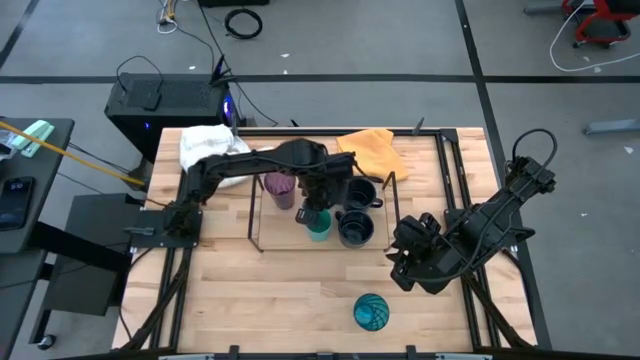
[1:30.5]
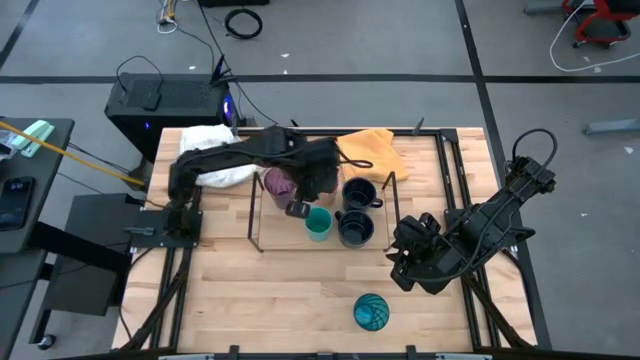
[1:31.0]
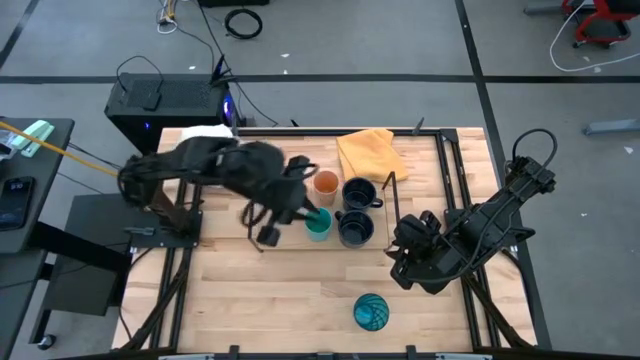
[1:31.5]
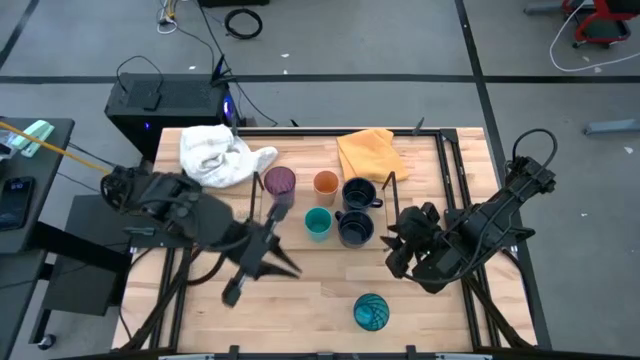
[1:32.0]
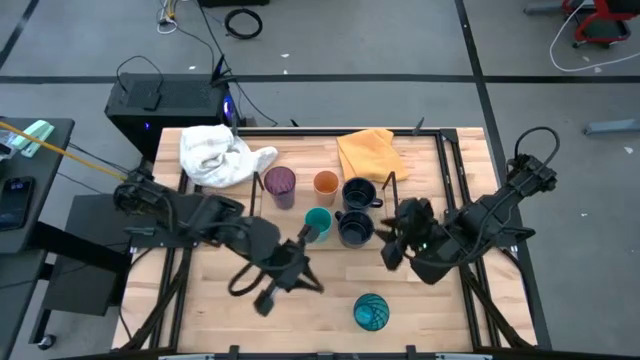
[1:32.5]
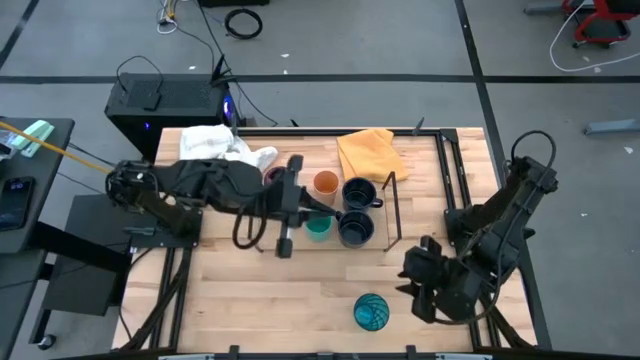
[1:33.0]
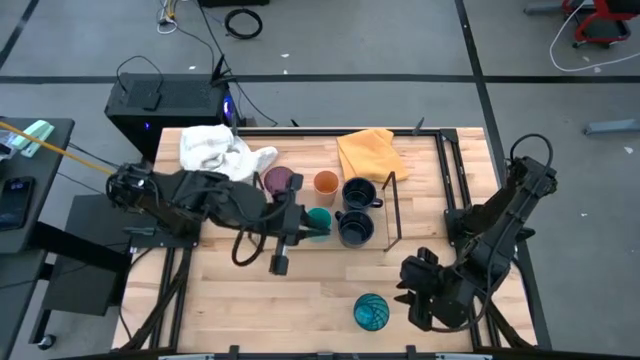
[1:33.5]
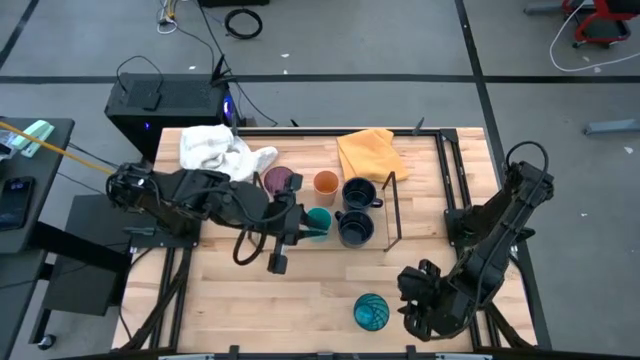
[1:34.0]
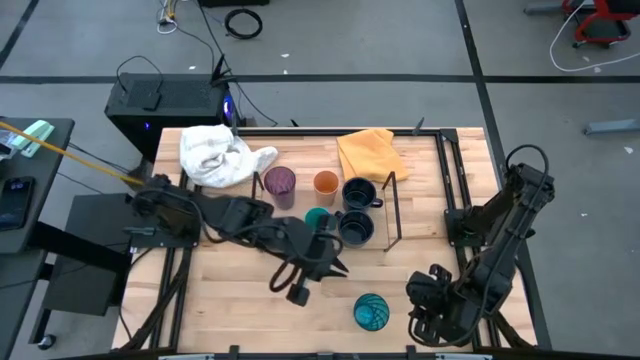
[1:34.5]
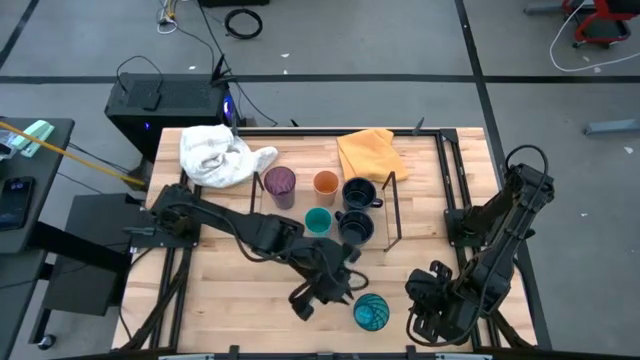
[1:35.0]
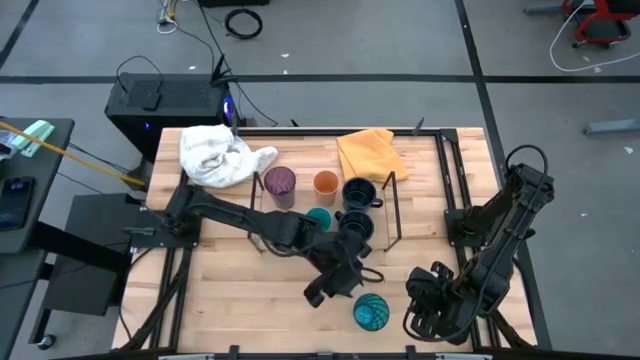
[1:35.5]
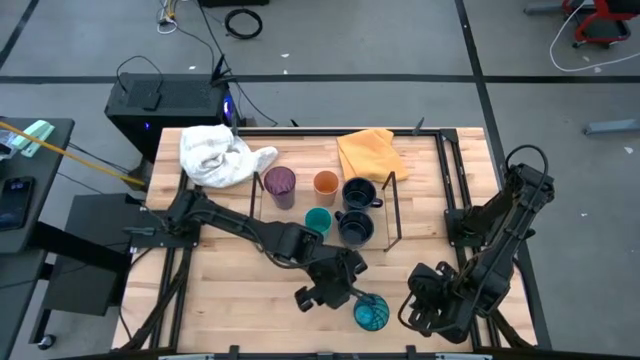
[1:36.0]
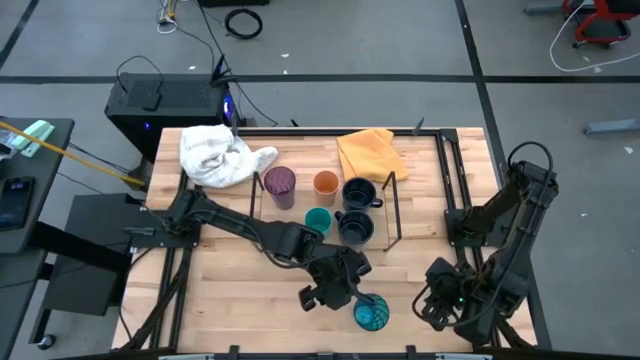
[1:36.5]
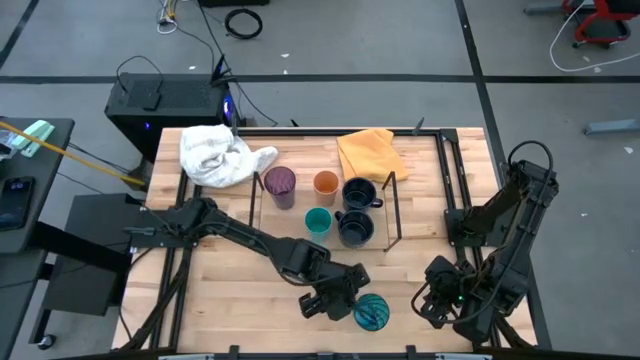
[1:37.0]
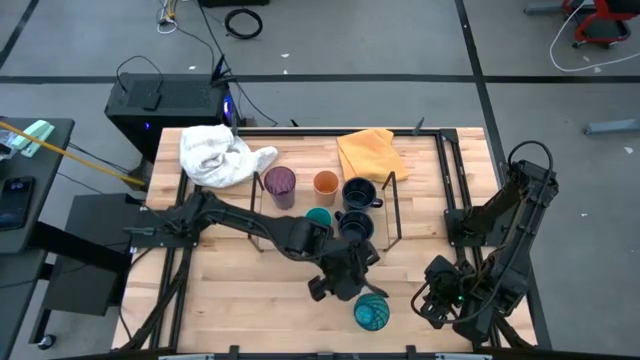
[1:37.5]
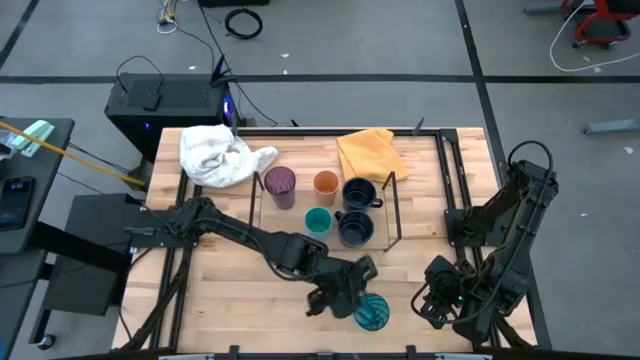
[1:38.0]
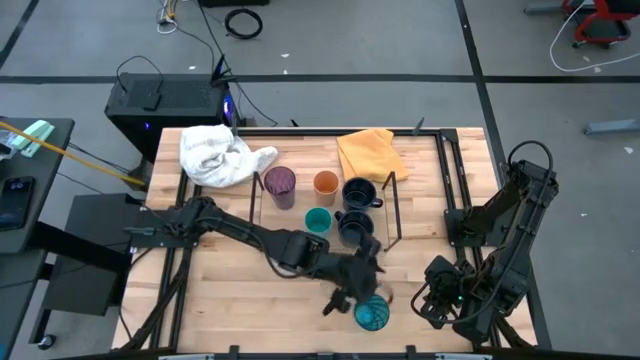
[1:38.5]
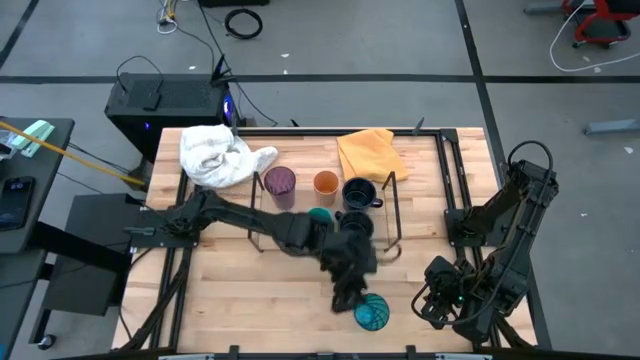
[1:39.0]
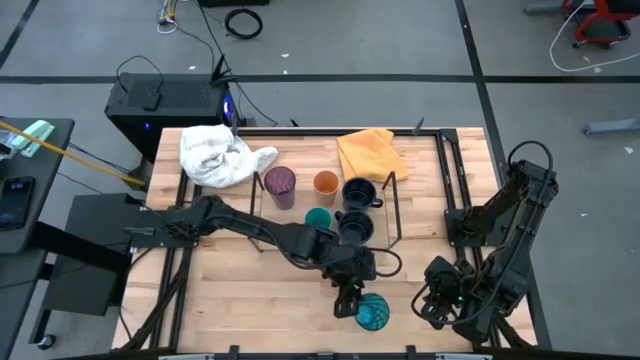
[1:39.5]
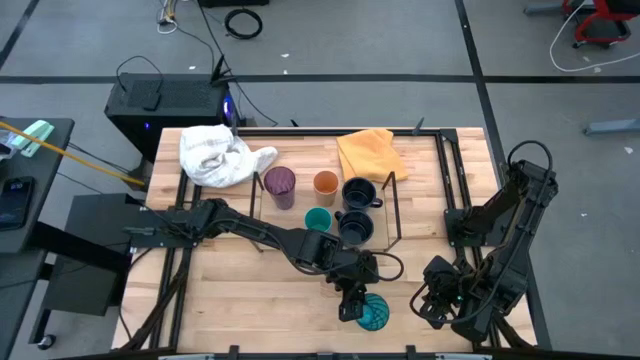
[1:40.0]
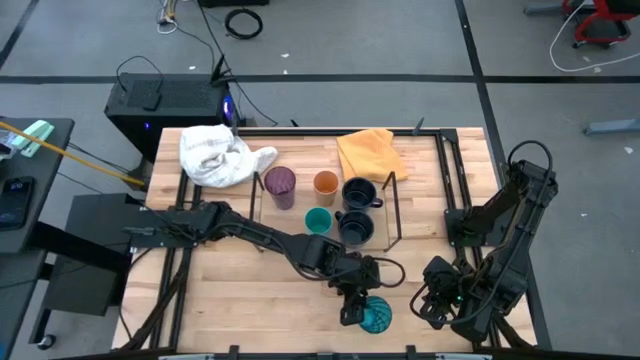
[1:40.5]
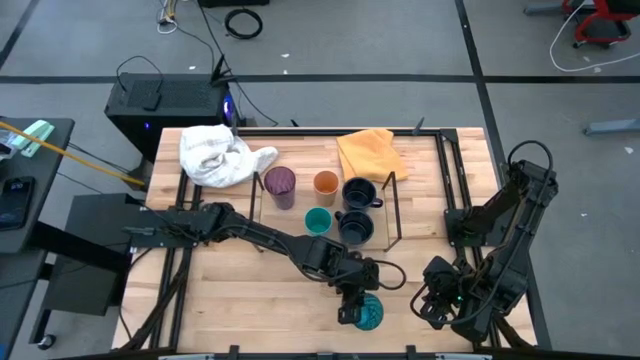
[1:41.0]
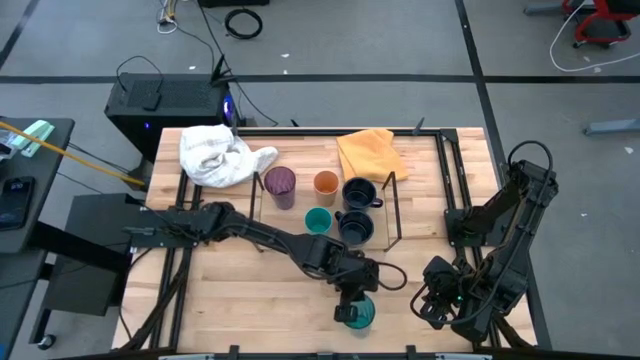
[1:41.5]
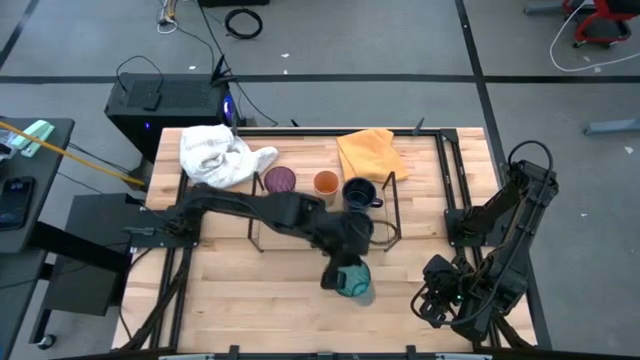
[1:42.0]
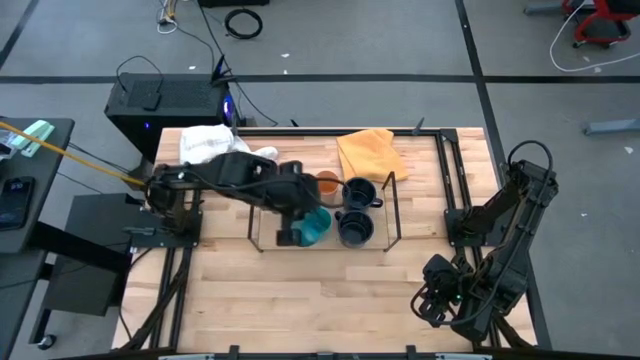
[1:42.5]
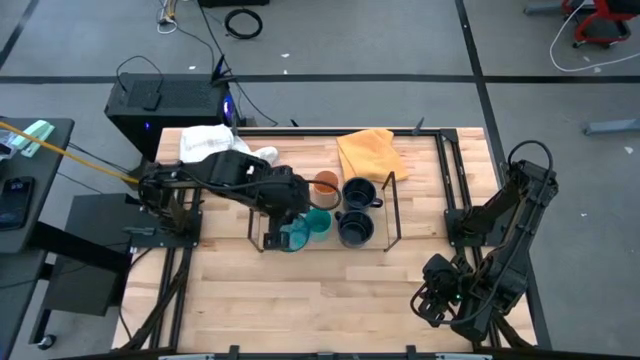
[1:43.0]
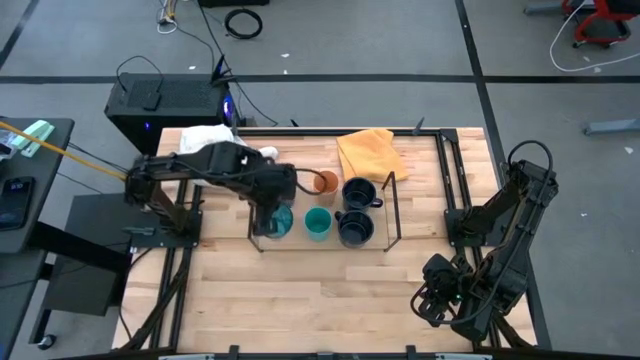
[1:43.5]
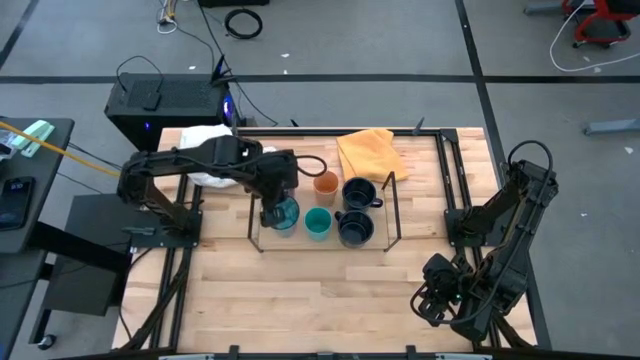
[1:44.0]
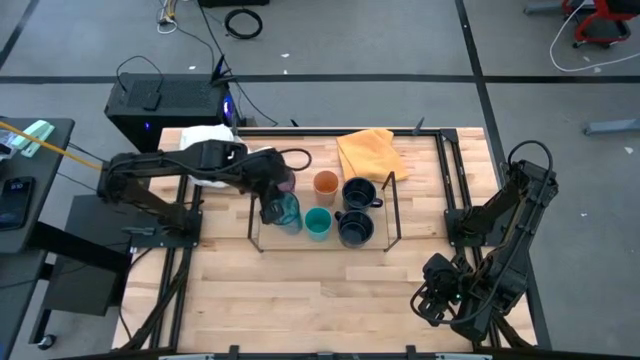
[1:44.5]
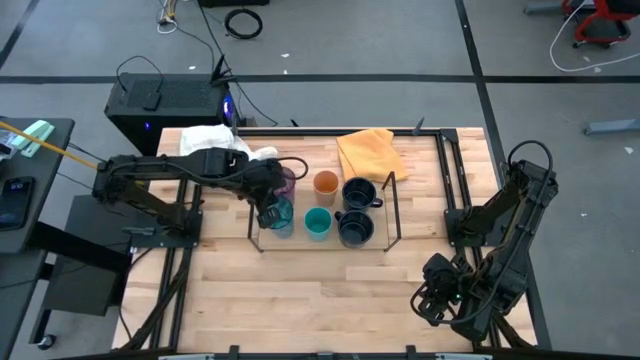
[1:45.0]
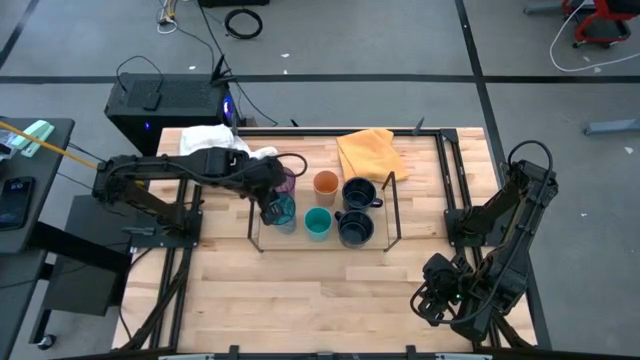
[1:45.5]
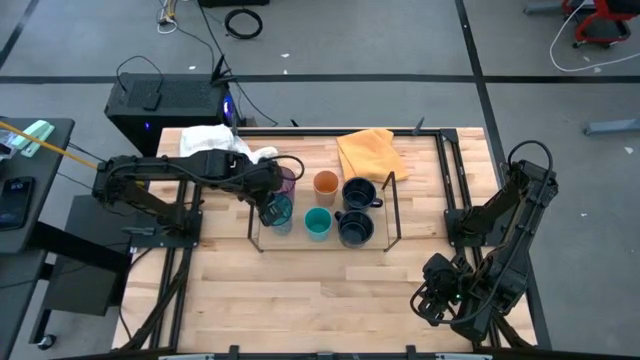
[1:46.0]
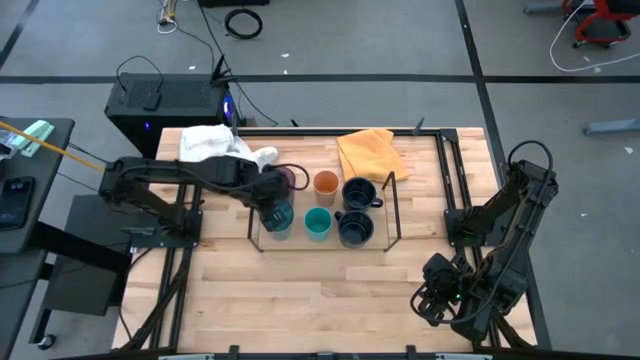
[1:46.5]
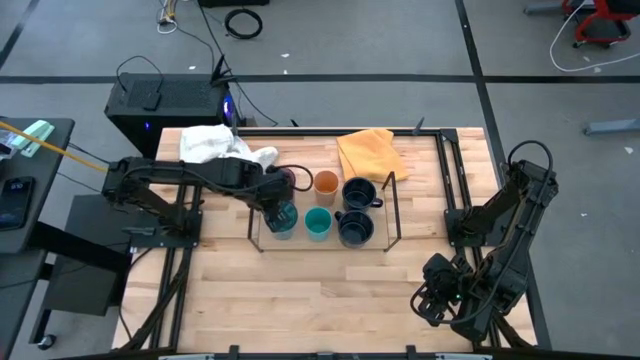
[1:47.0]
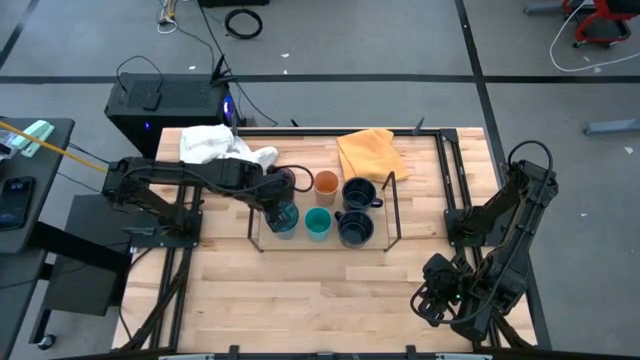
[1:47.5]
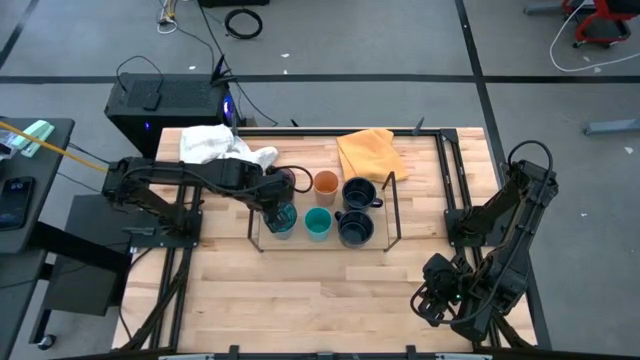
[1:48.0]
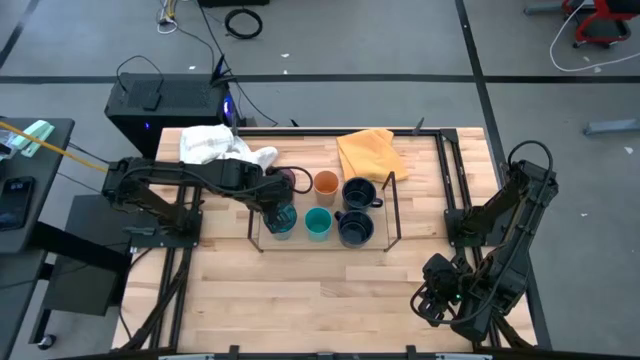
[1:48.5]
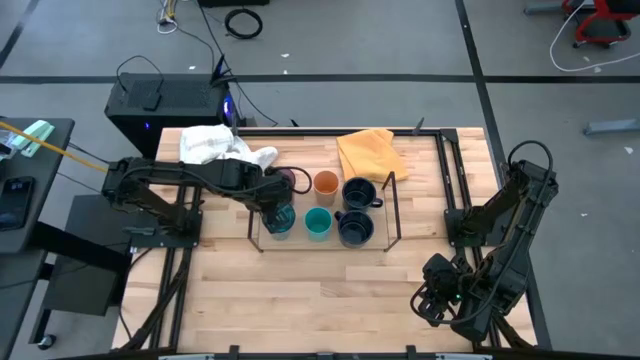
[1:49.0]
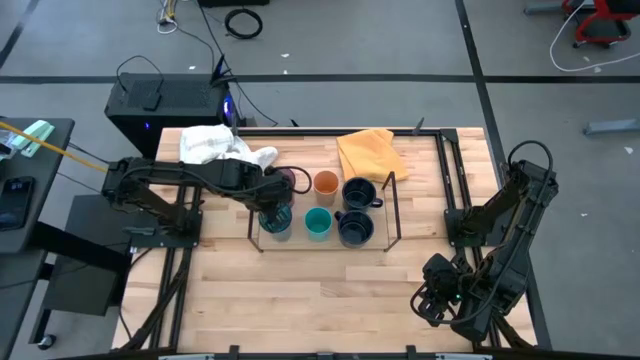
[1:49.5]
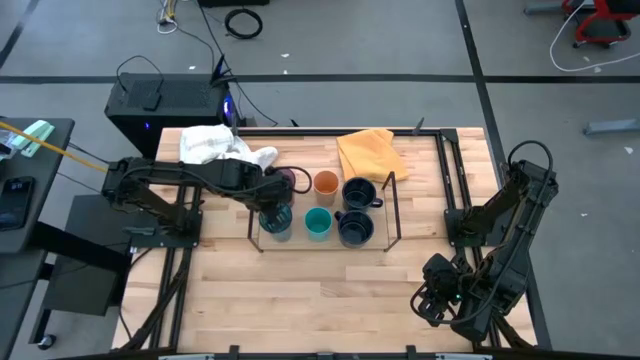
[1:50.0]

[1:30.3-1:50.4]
Task: Stack small to large cups/mugs on shelf
Put the blue transparent glass on the shelf

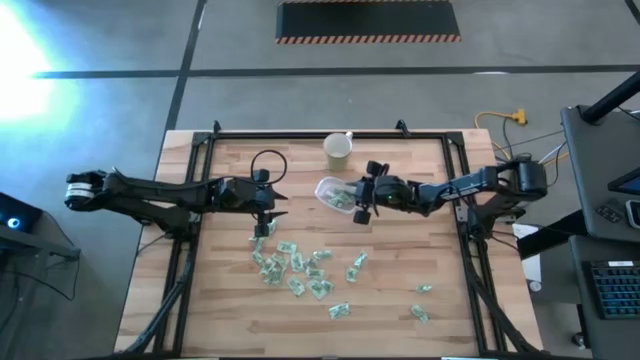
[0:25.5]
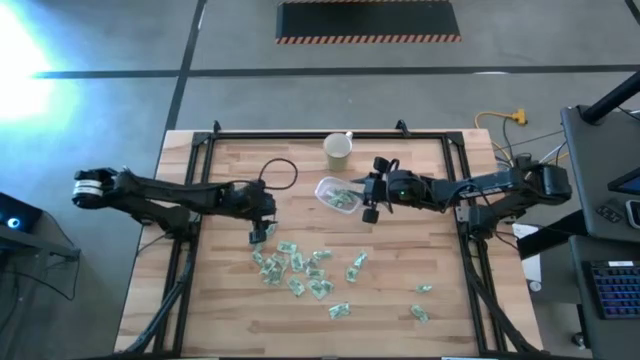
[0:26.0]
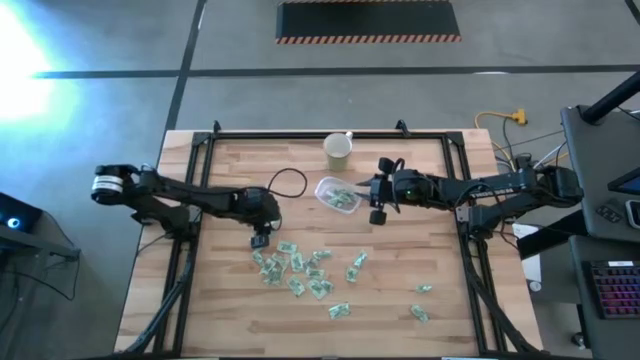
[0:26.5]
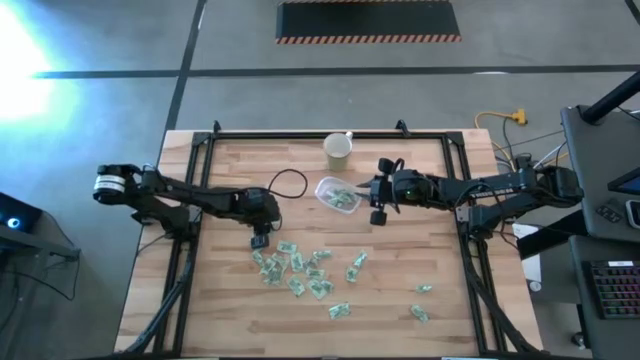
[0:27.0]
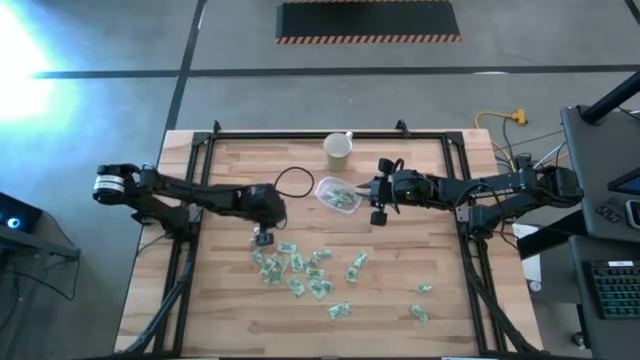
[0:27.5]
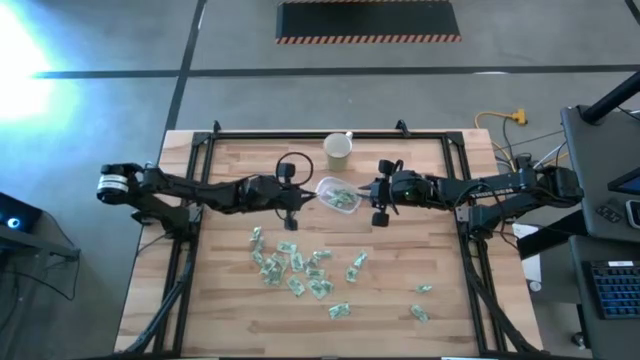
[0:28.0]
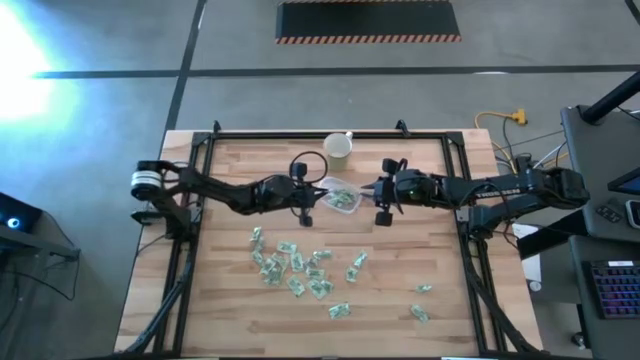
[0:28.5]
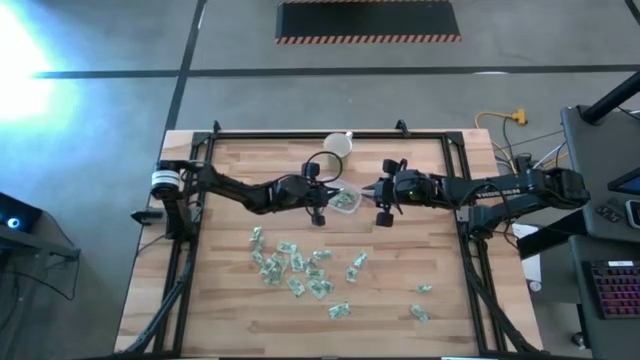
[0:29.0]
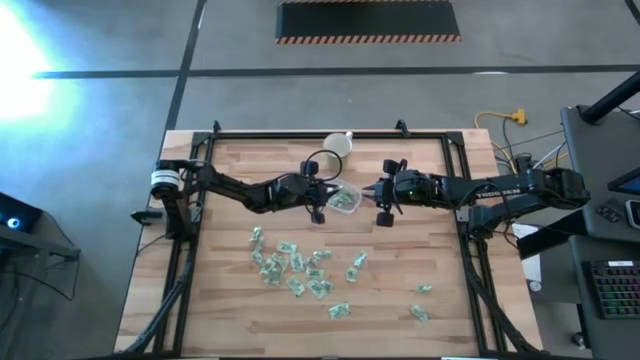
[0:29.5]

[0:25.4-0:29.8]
Task: Pick and place items into bin
Put the green stevia packet into the transparent bin
